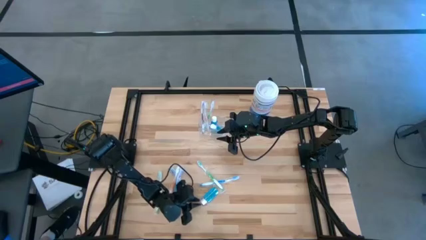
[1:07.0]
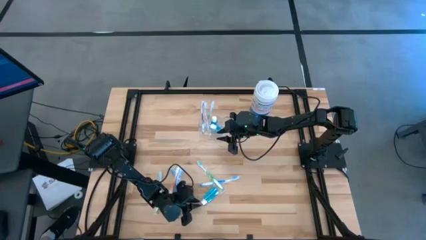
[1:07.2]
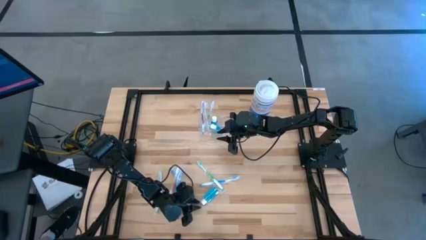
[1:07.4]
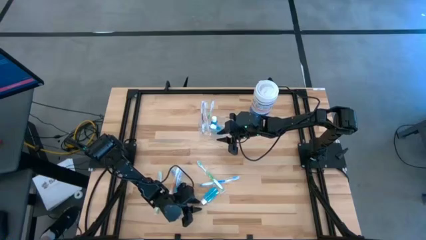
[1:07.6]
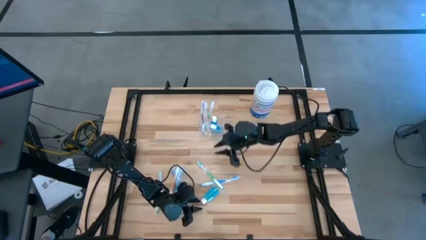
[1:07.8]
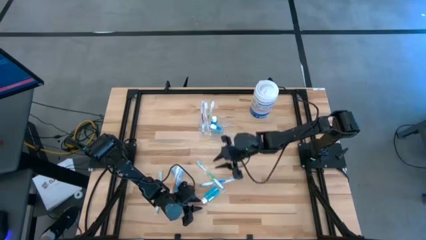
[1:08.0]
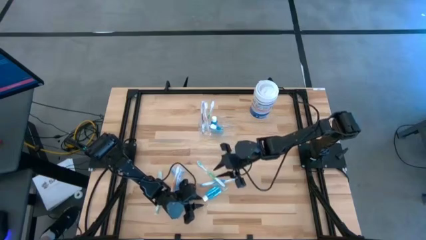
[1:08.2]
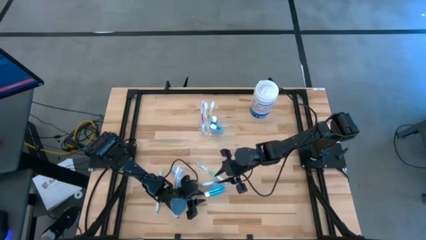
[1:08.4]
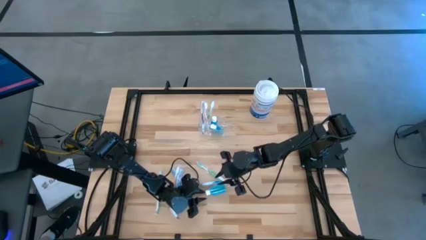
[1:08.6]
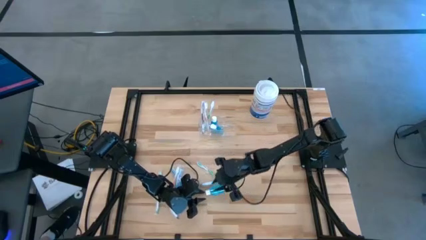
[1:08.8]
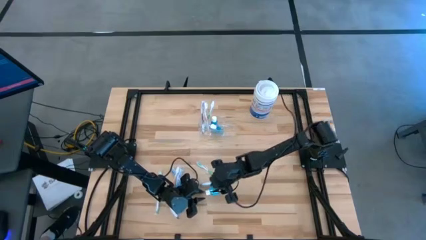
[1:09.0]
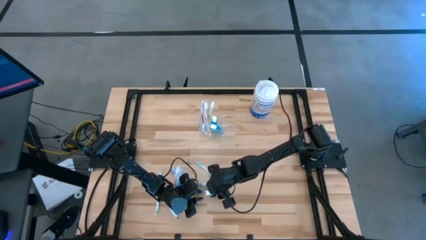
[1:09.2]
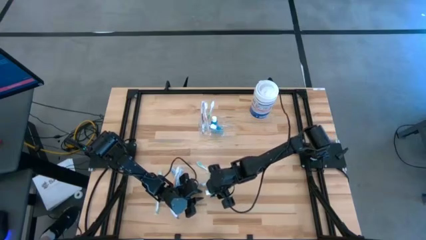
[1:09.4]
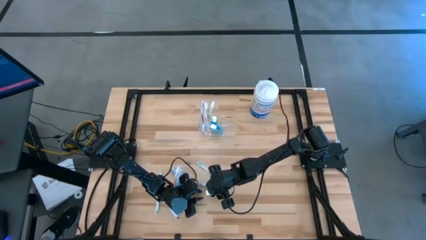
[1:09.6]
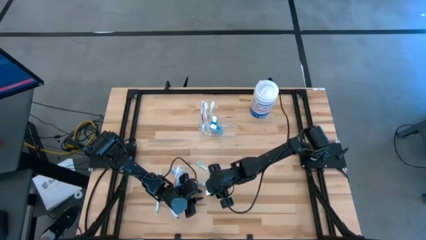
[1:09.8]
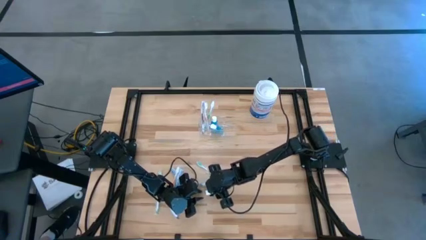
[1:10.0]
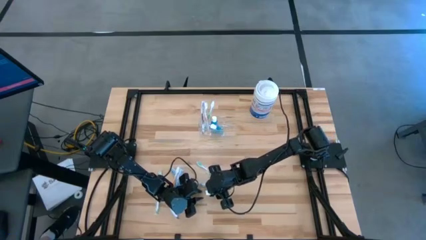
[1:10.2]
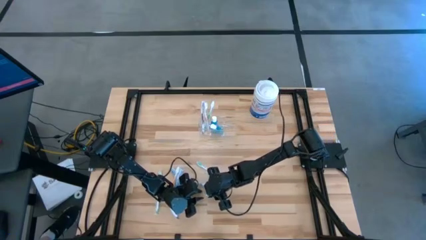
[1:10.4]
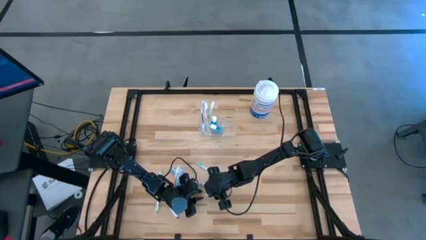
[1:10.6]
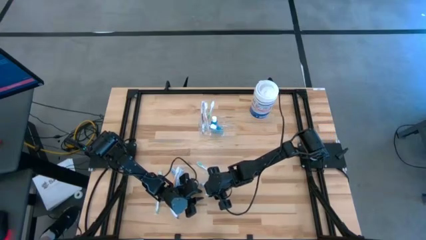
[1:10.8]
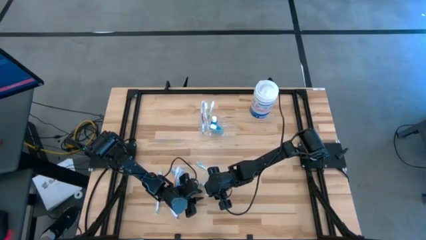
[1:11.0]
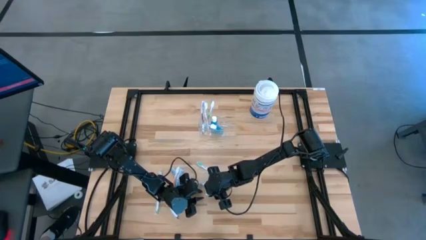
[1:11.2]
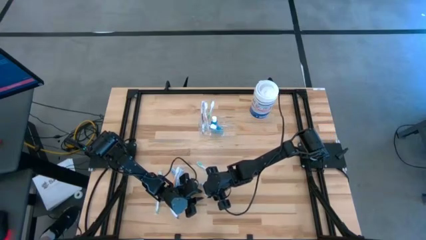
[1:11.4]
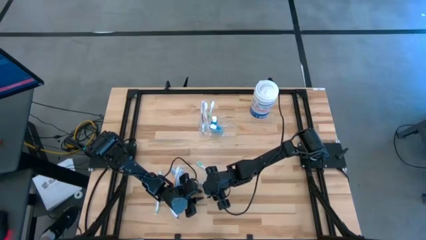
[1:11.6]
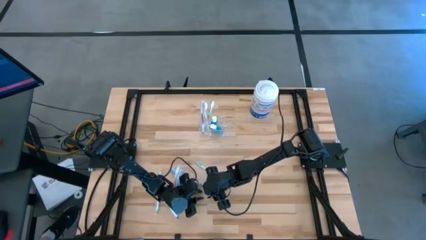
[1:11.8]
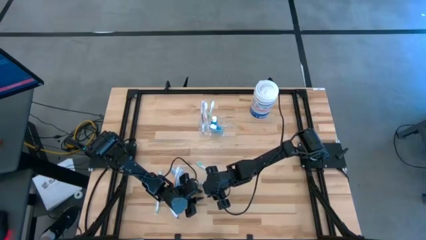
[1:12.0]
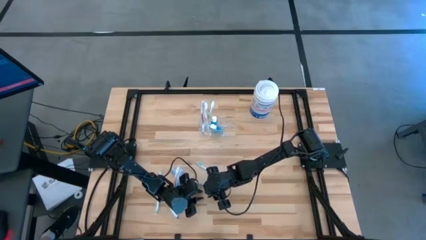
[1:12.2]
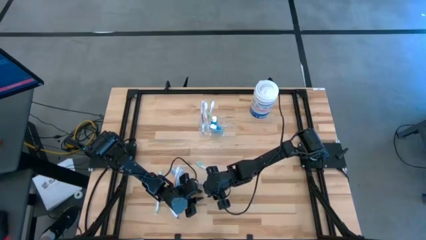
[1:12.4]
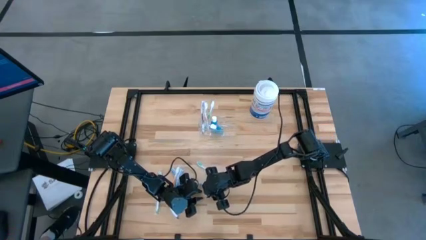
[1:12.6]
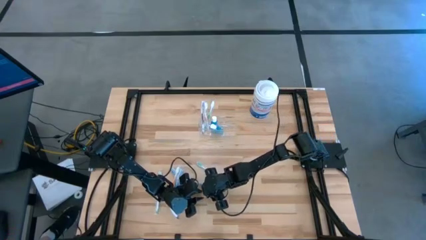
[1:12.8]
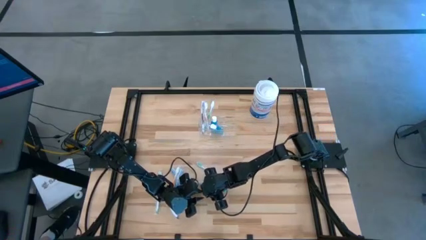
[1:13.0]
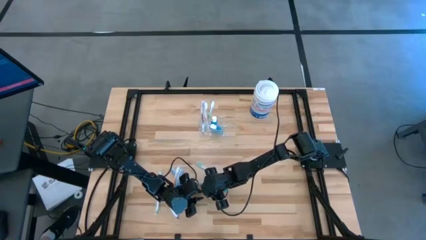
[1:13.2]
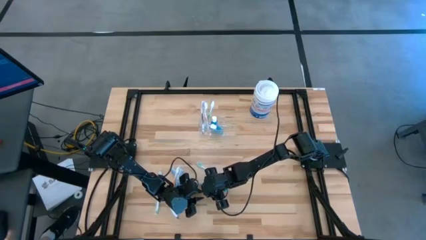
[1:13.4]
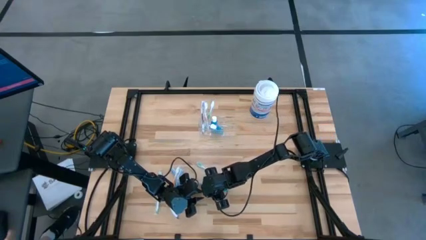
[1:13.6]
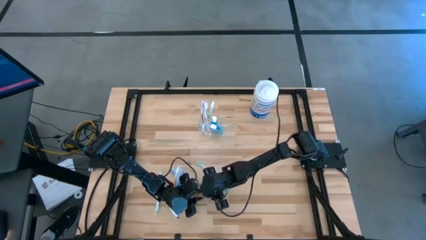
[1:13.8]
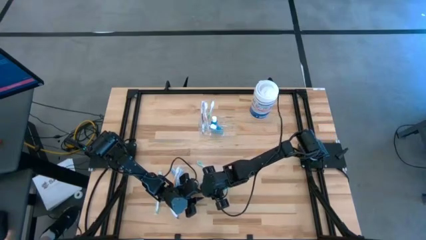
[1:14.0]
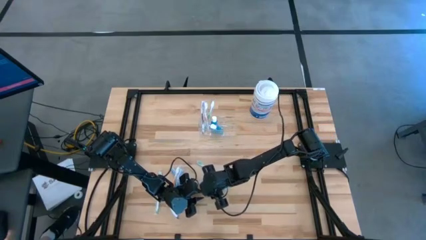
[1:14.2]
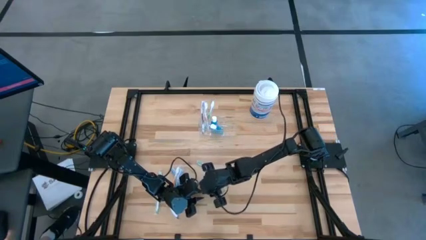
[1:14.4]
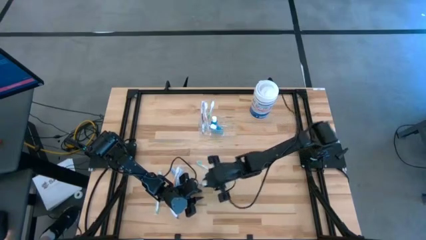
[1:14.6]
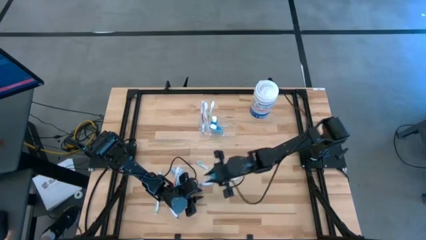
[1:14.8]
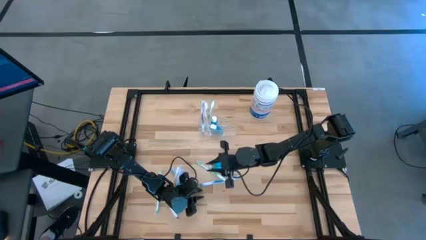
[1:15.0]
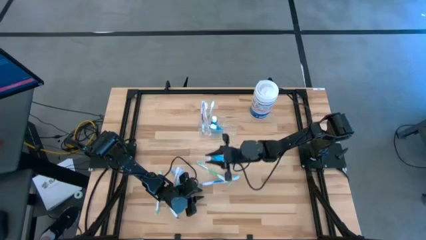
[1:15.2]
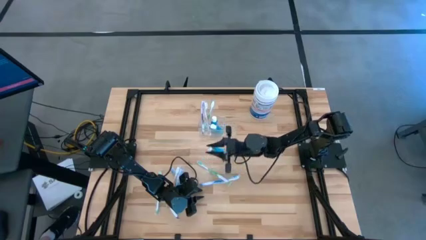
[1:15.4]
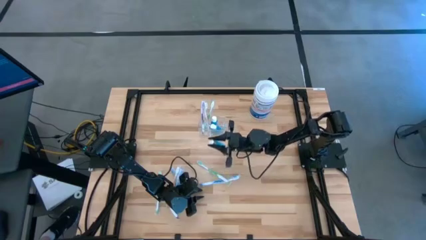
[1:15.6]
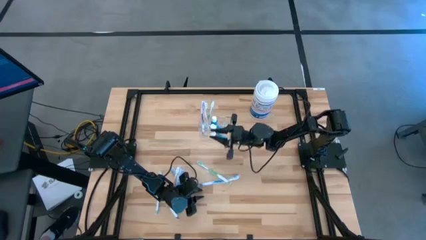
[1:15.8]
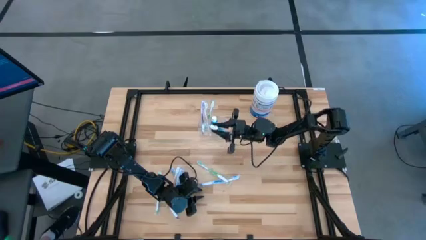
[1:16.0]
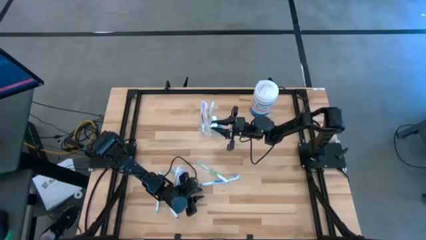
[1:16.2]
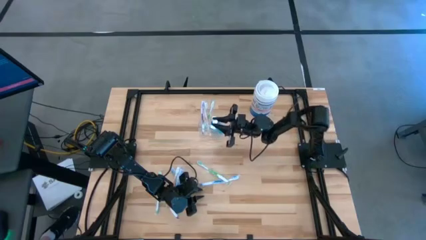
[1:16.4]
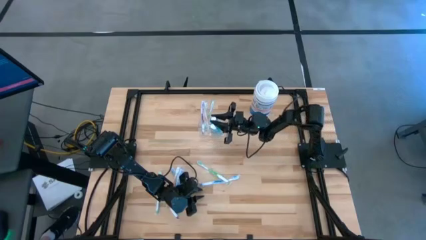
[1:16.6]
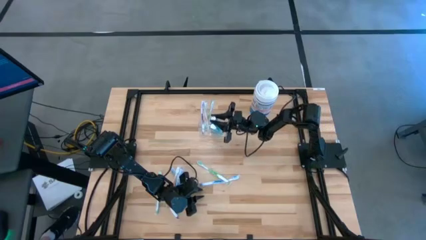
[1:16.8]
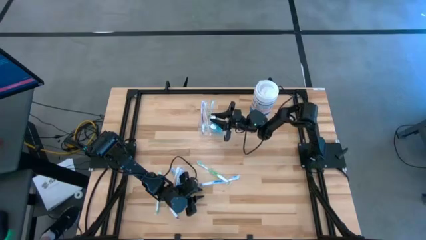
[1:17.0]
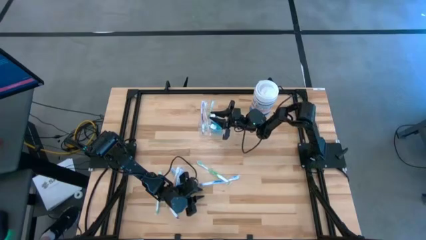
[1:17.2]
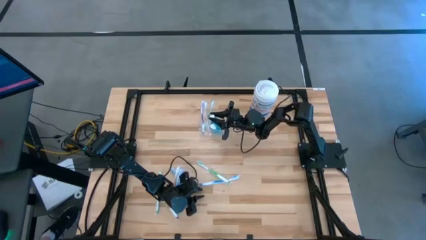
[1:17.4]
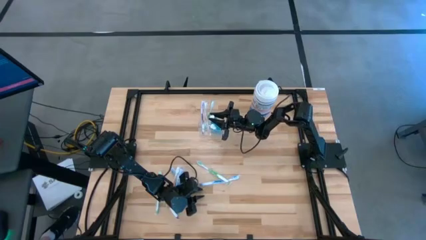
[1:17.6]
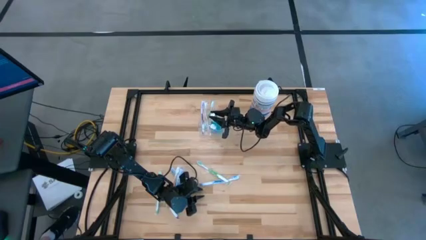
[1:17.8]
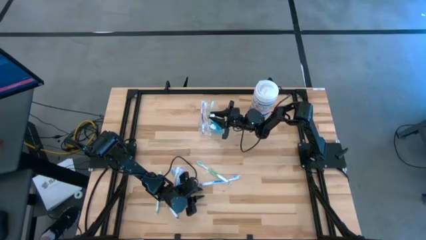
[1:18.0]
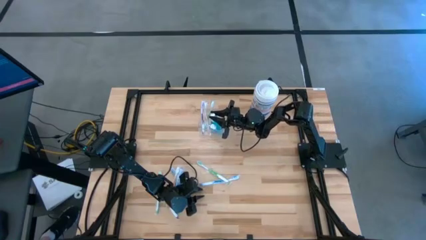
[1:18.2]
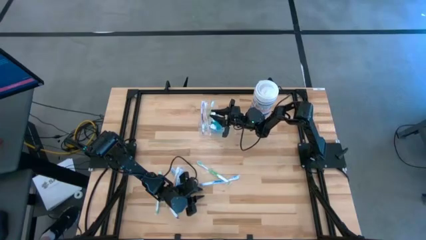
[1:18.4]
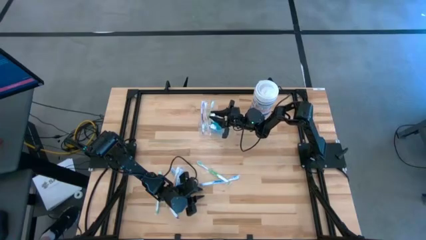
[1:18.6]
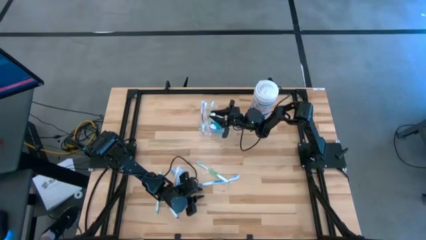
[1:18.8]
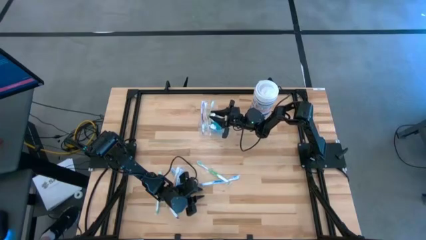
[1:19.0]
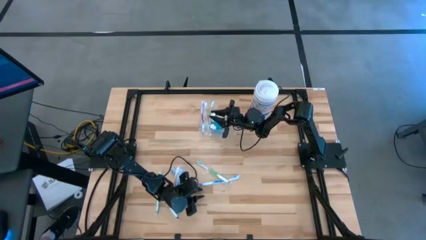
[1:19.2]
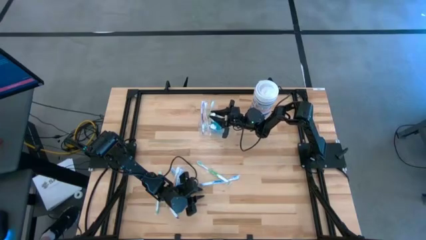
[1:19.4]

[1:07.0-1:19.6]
Task: Pick & Place toothbrushing station
Put the mouthwash into the transparent organizer

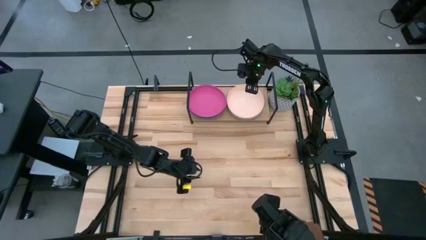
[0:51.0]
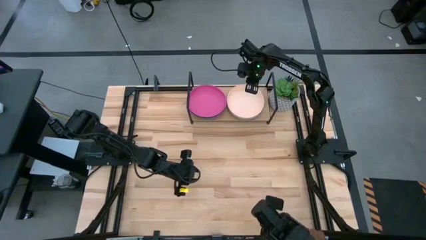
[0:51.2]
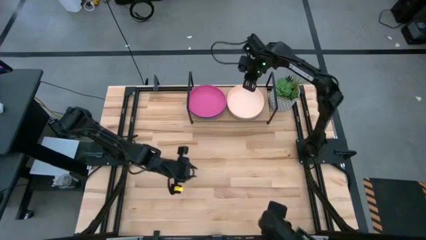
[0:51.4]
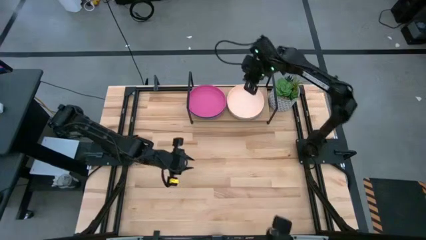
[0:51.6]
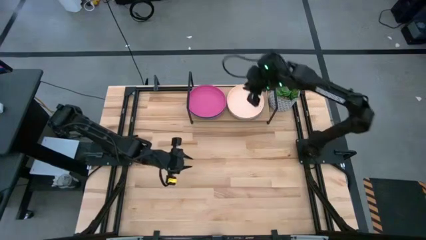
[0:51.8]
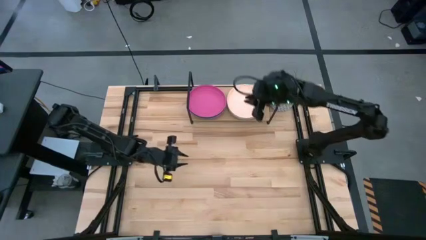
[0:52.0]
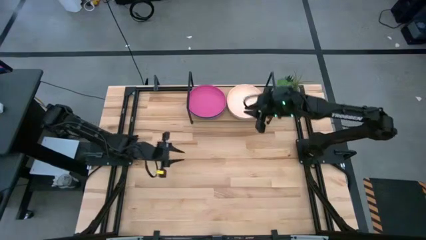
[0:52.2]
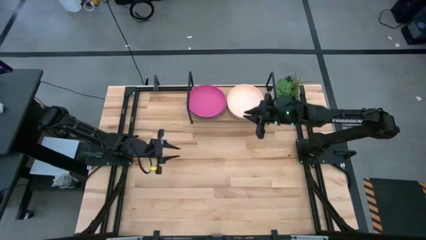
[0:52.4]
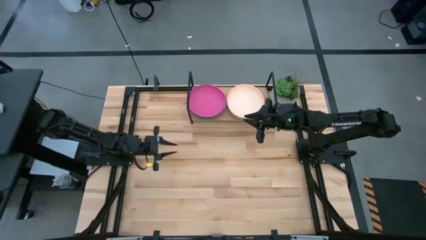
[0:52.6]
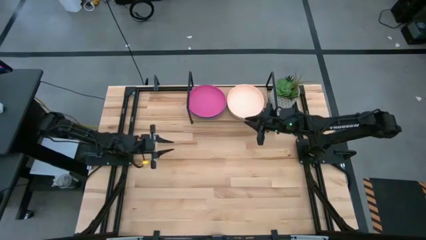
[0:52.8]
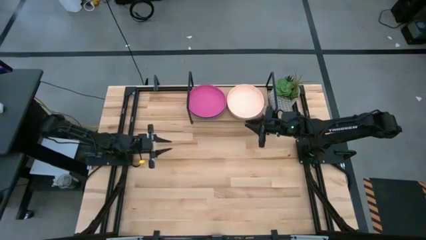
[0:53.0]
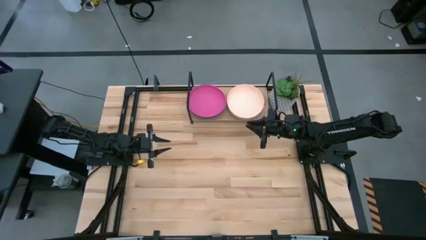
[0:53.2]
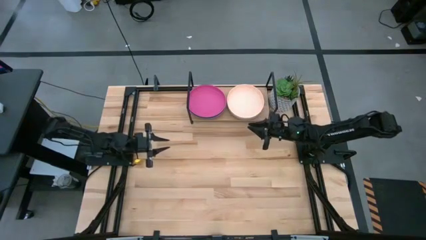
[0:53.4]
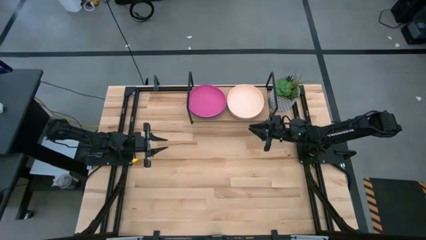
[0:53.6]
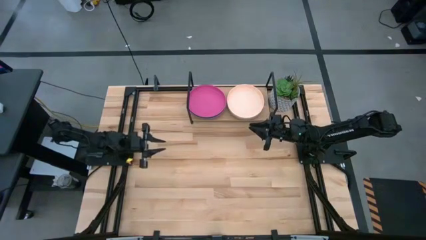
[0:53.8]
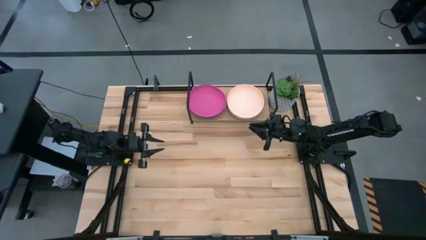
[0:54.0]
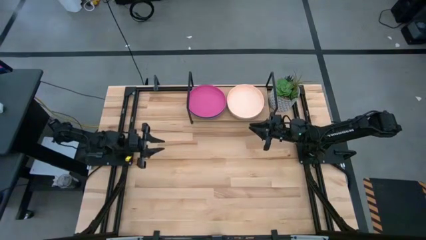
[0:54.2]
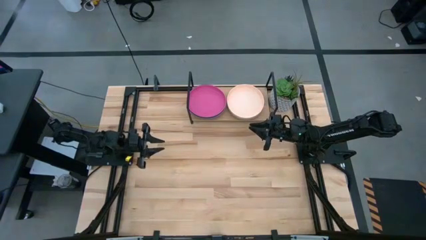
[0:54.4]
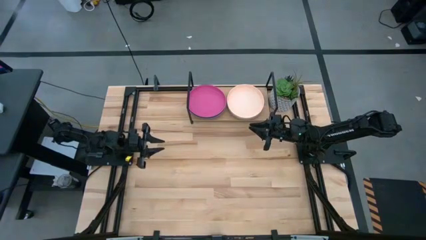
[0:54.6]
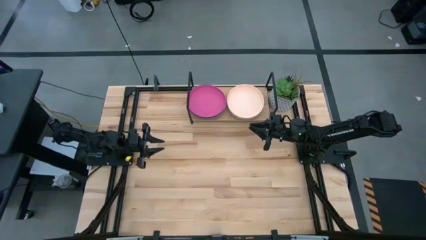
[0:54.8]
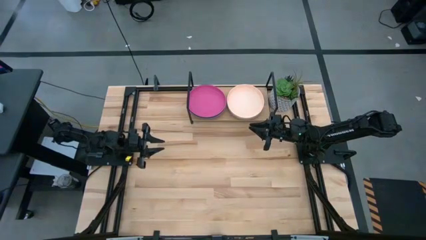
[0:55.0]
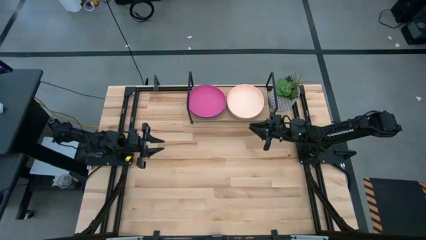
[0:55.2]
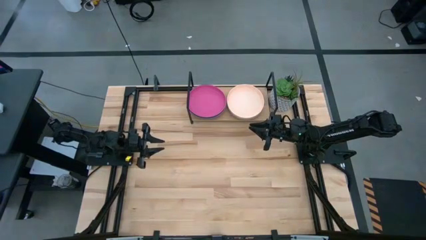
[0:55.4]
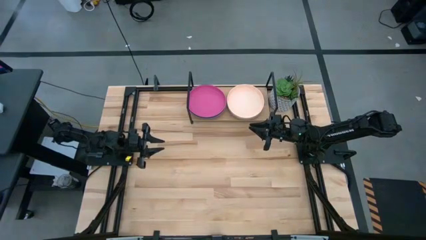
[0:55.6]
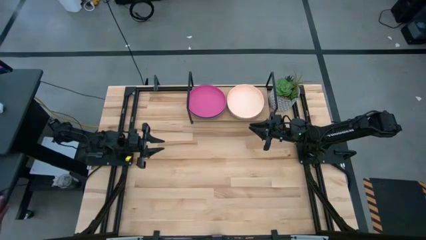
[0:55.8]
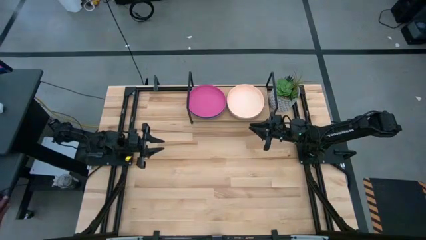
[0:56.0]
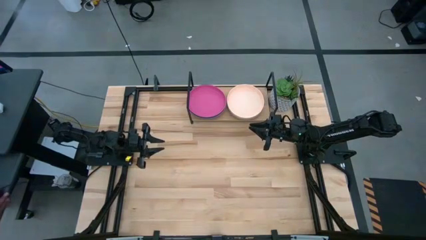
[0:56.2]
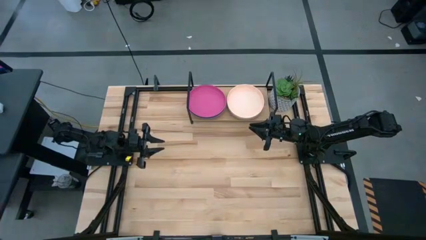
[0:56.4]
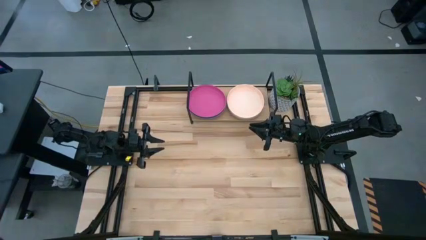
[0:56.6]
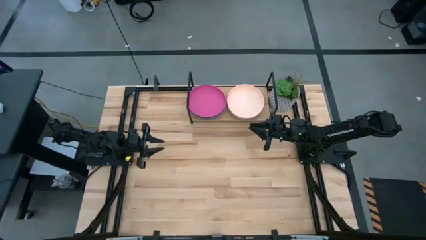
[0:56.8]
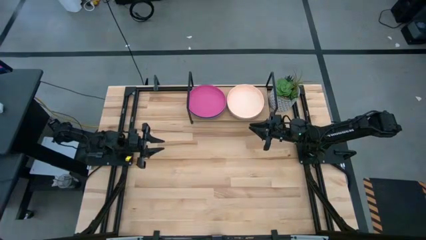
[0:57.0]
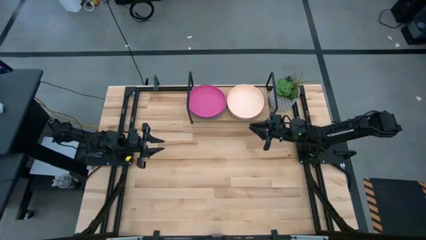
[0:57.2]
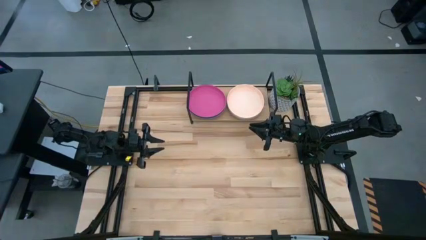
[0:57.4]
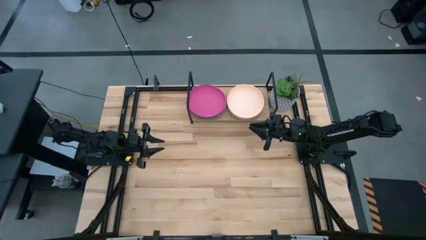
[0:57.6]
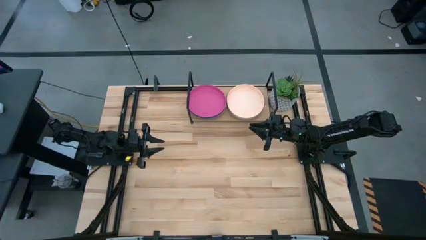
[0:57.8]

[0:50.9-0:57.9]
Task: Place and stack plates onto a shelf
Return to Home Position
